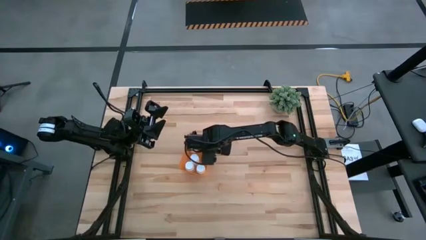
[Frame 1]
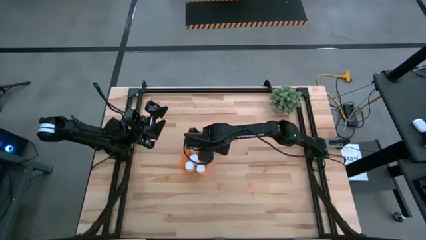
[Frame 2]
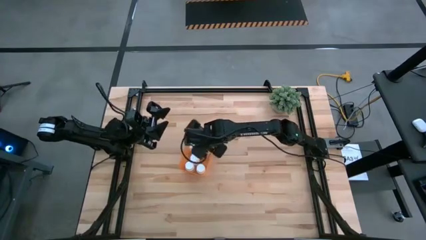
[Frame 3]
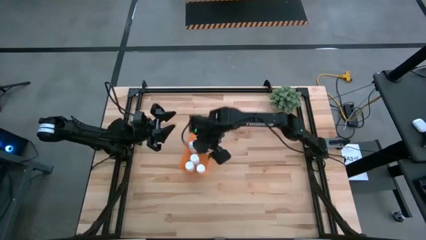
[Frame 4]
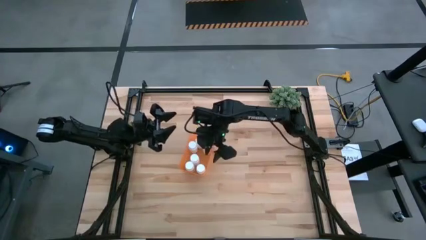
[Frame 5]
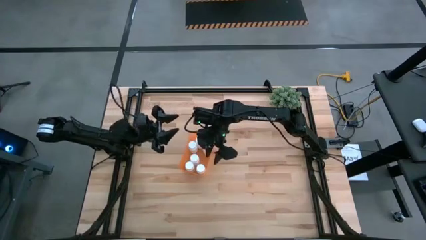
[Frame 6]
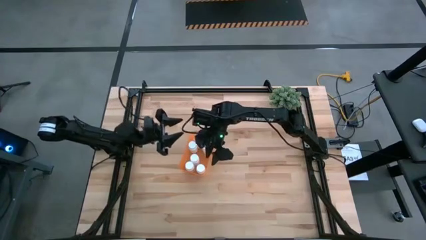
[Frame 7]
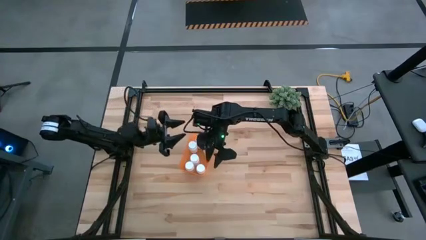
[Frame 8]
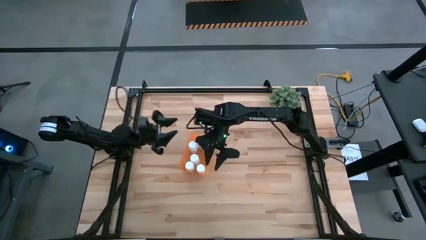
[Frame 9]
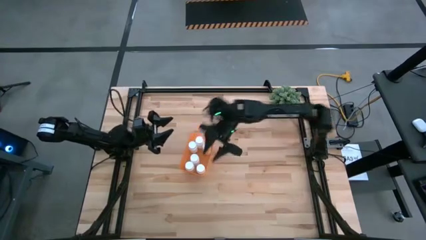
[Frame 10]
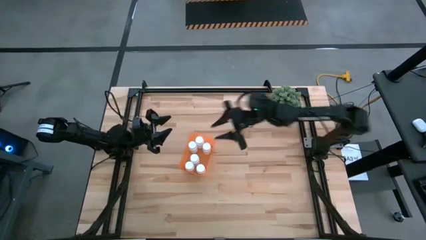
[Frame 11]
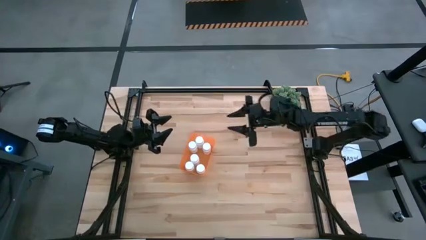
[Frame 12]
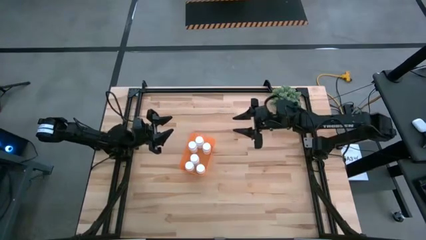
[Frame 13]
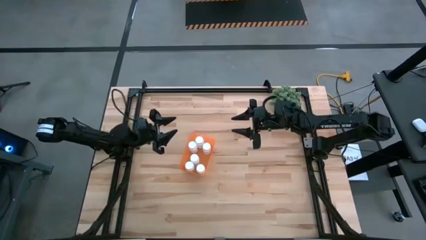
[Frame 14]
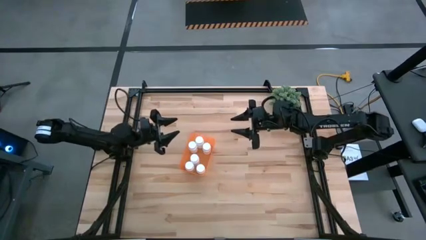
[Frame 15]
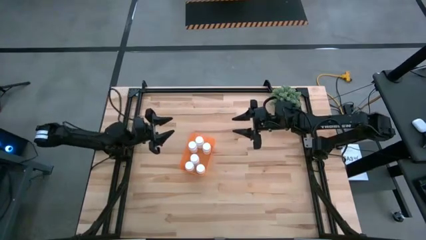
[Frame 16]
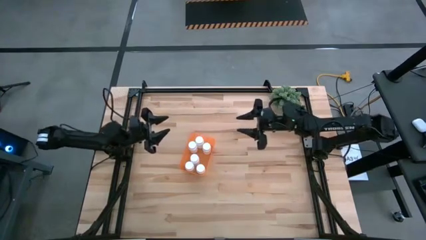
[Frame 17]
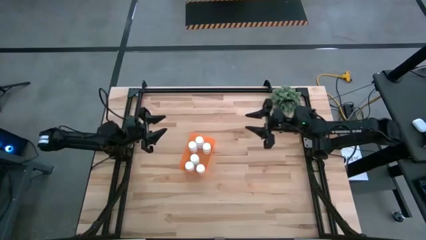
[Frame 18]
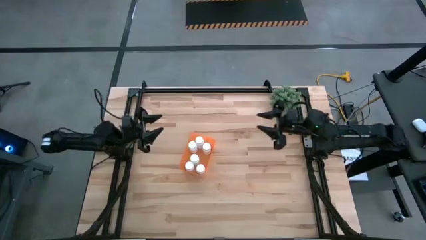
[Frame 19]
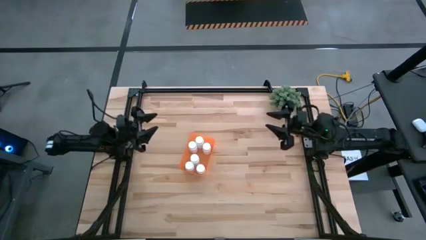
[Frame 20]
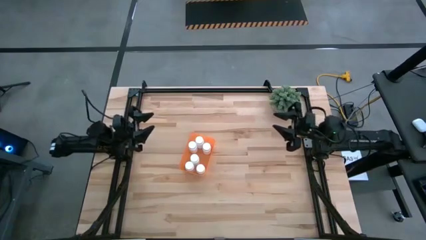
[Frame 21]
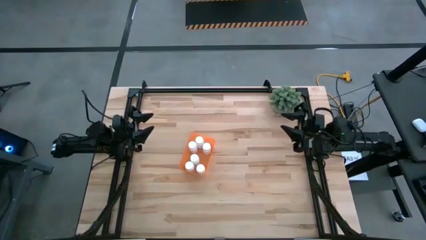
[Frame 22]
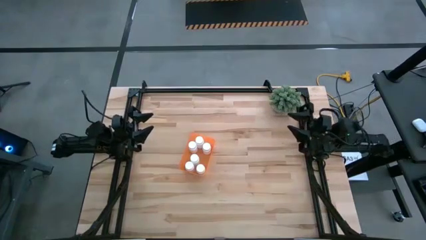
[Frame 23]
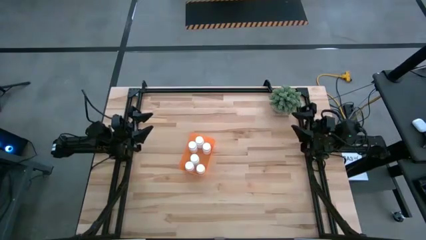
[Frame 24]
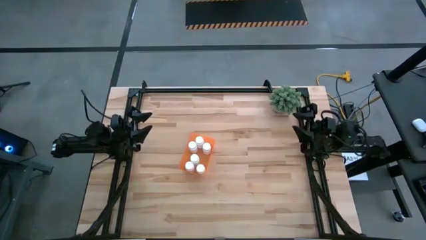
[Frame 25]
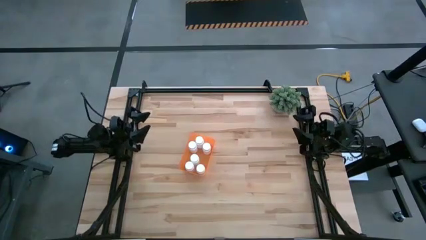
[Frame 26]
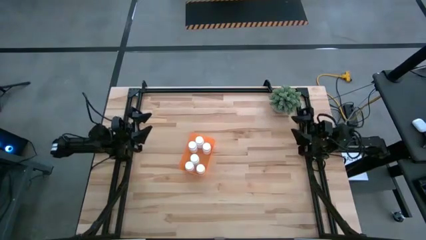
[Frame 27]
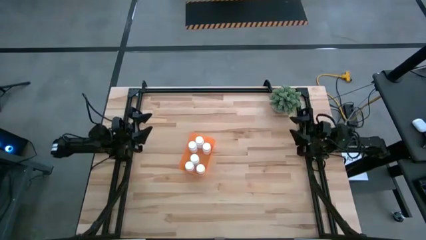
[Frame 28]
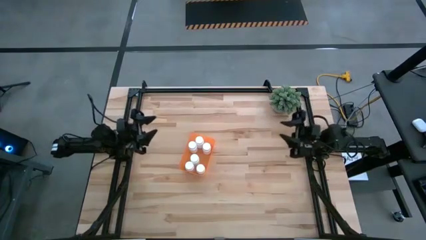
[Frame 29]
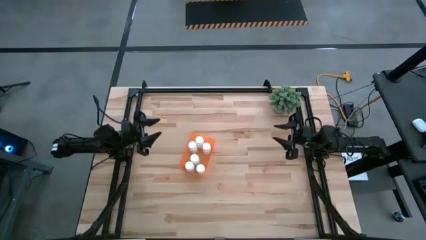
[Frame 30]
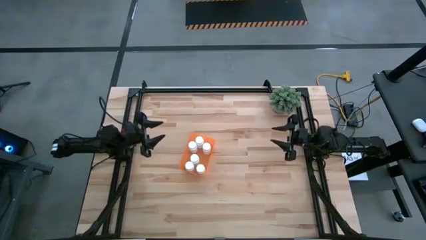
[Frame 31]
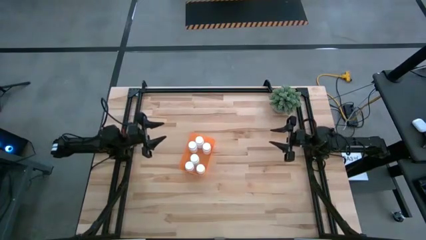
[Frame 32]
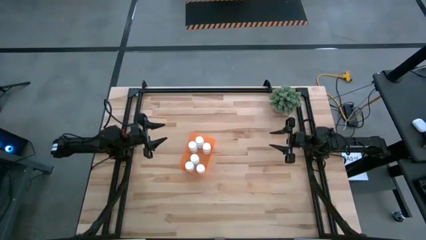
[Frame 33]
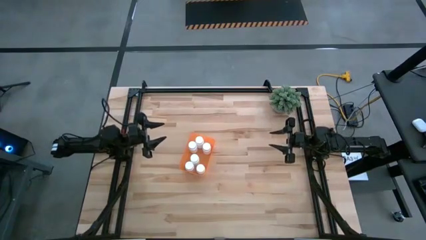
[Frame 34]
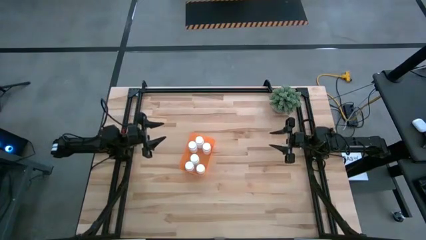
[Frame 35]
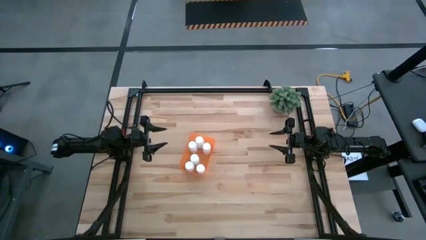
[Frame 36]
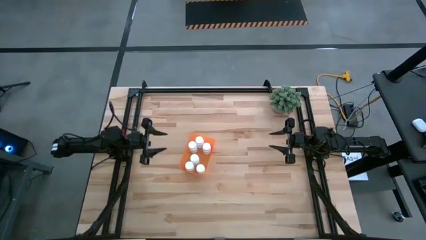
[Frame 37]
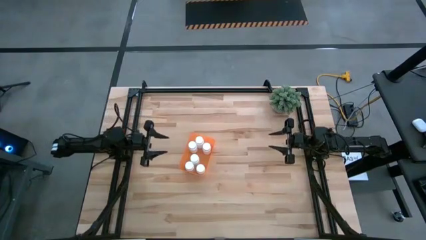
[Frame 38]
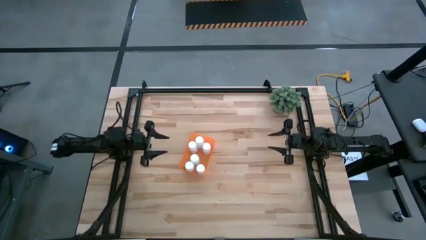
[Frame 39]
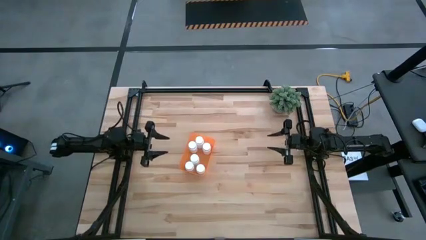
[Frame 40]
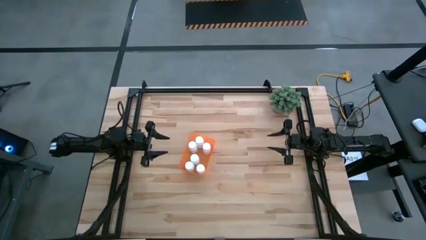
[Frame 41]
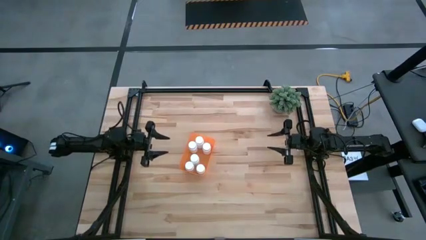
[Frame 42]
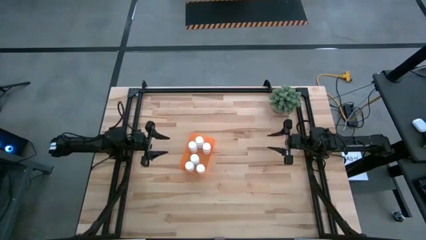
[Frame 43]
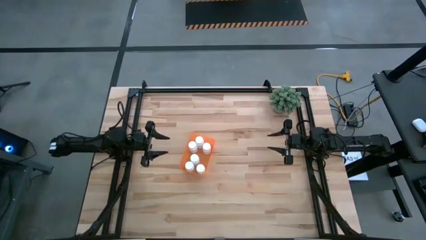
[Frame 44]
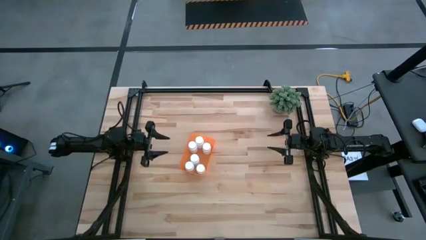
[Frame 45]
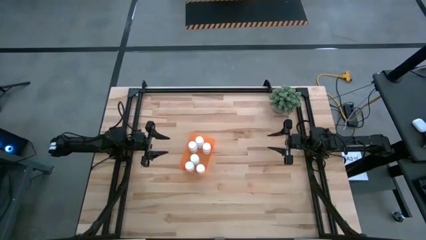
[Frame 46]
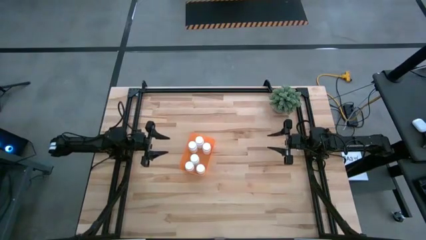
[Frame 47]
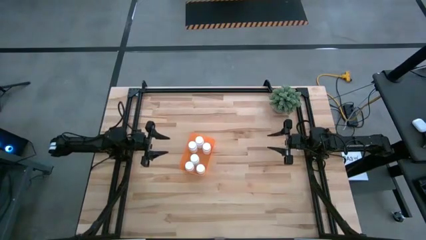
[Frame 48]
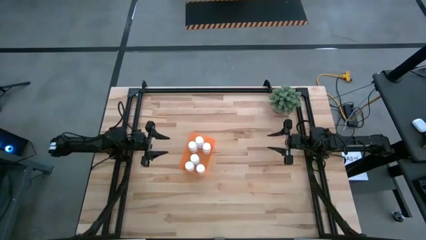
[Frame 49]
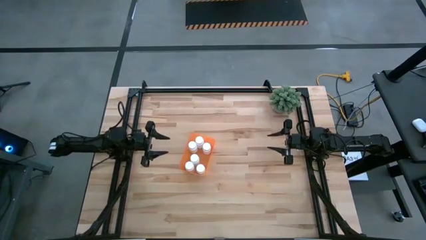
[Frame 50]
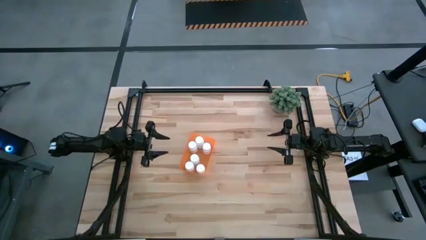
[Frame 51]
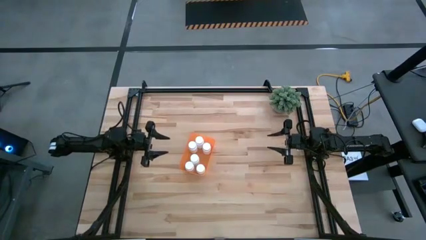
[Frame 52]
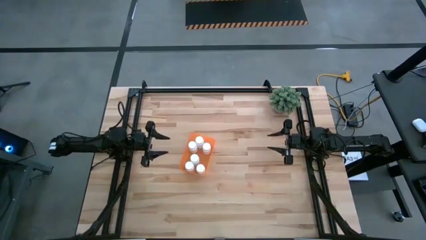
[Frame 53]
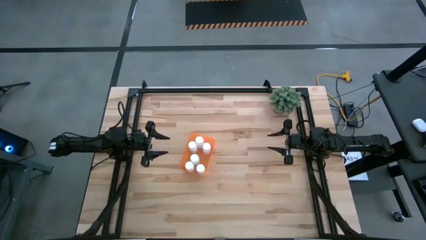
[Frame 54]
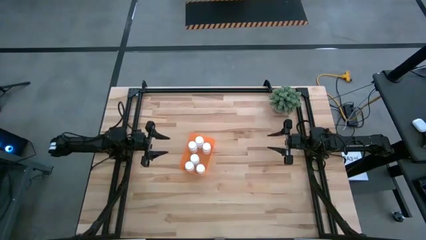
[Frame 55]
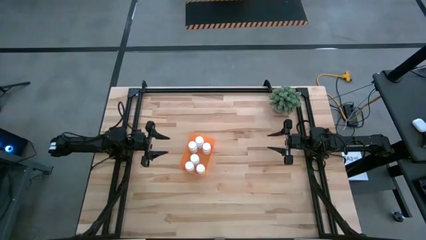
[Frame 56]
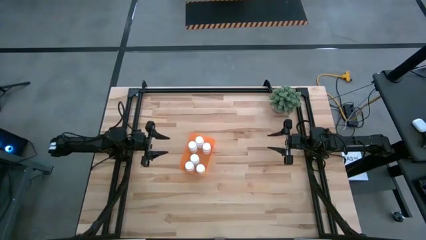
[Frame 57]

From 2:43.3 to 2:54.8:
Task: Pick and place pill bottles into a basket
Return to Home Position
